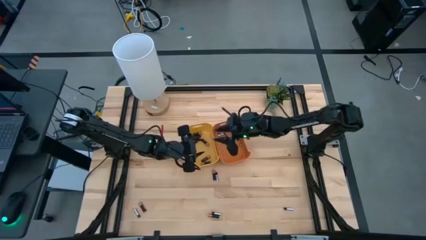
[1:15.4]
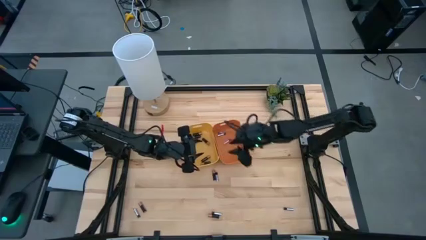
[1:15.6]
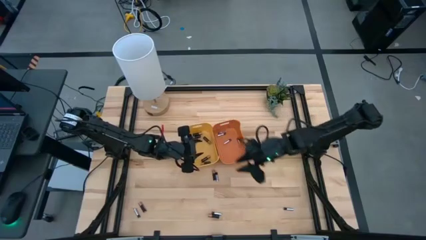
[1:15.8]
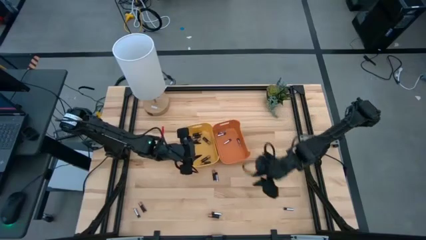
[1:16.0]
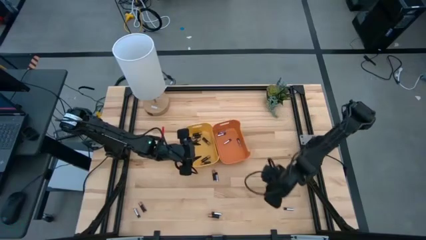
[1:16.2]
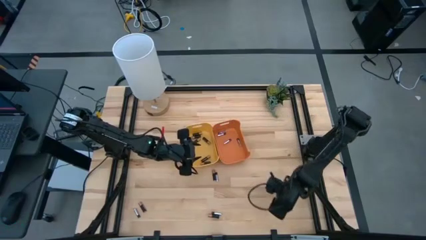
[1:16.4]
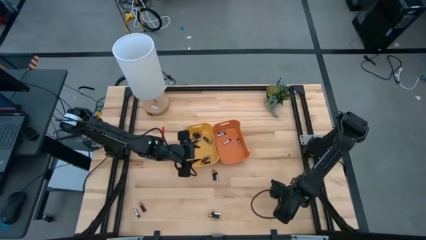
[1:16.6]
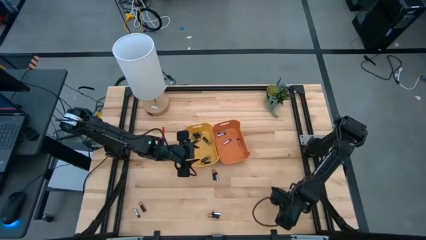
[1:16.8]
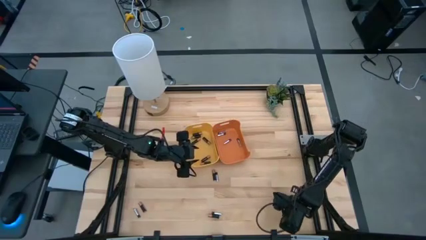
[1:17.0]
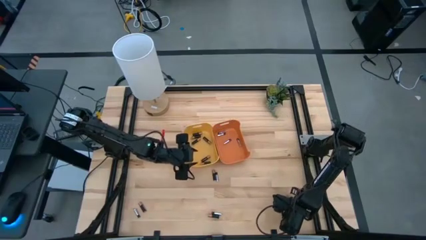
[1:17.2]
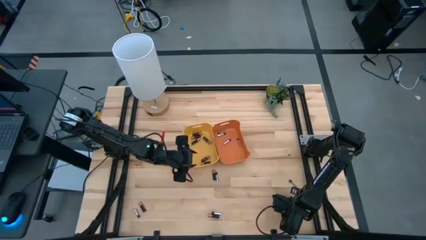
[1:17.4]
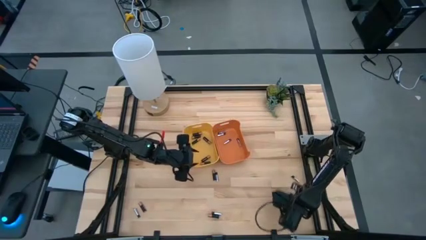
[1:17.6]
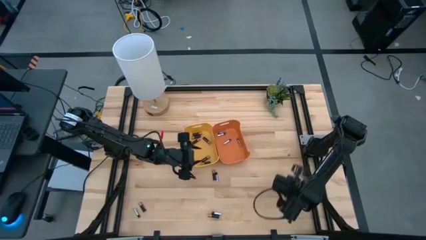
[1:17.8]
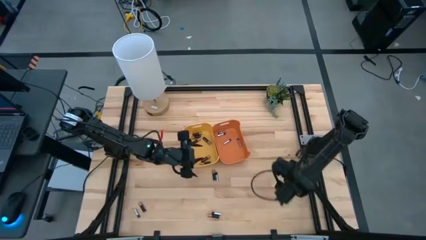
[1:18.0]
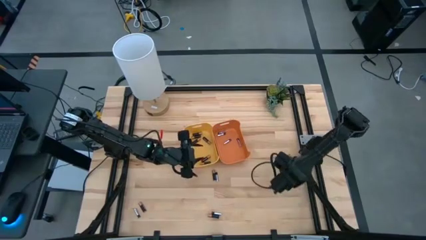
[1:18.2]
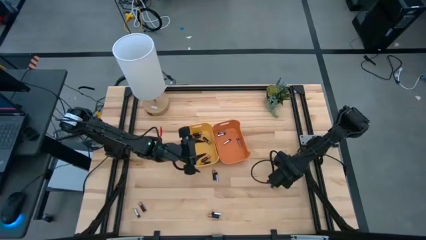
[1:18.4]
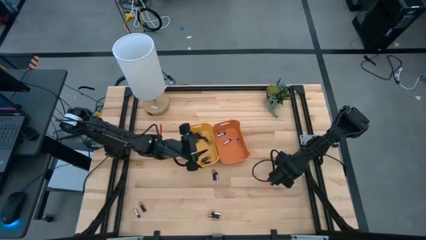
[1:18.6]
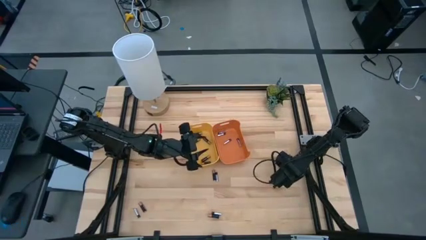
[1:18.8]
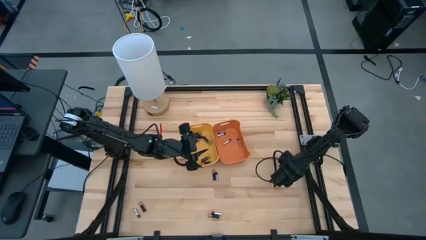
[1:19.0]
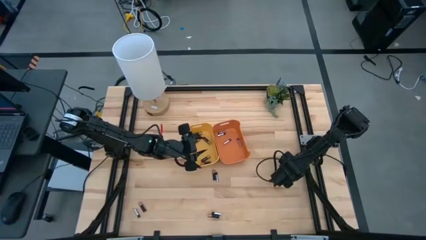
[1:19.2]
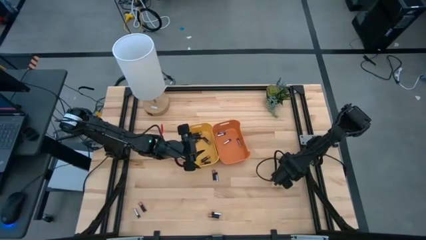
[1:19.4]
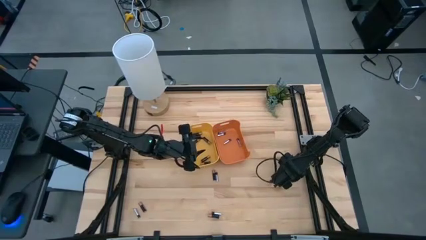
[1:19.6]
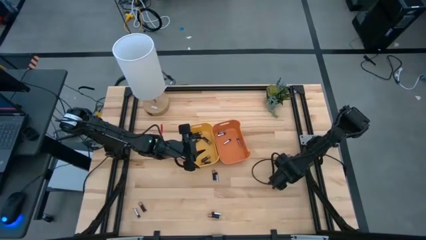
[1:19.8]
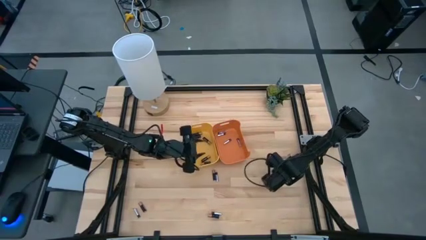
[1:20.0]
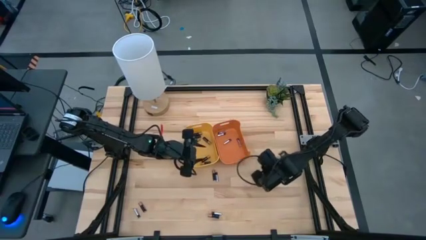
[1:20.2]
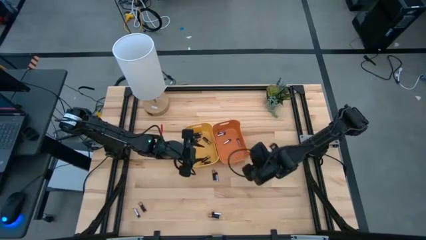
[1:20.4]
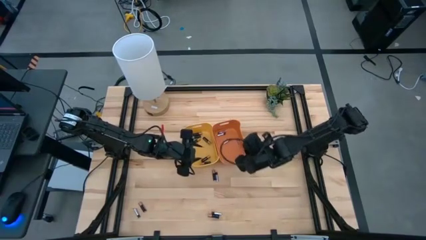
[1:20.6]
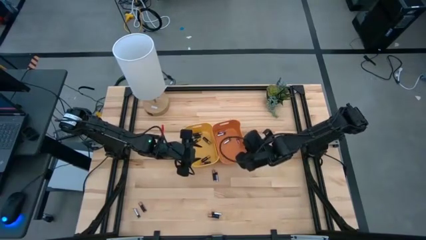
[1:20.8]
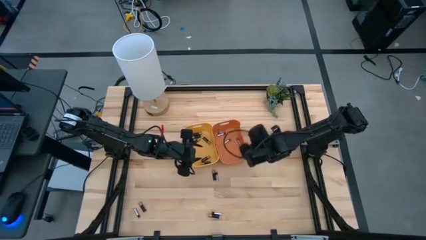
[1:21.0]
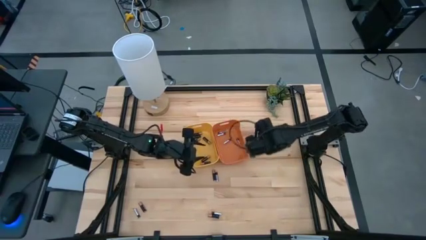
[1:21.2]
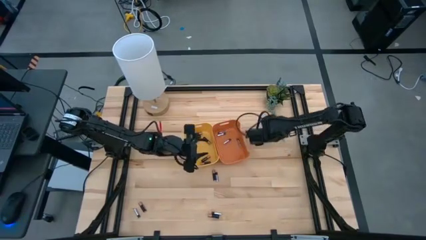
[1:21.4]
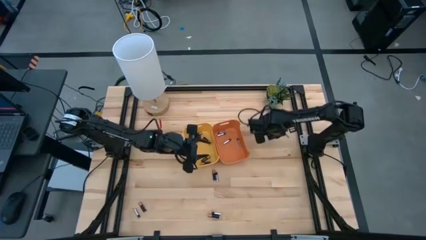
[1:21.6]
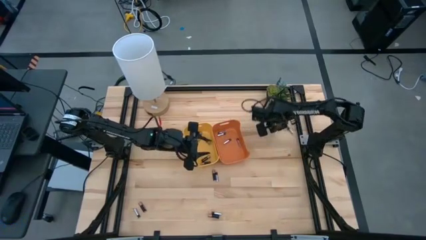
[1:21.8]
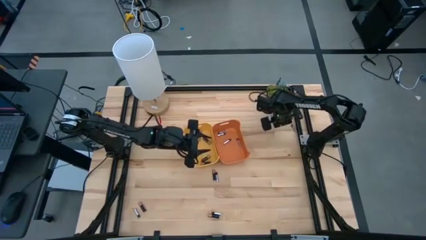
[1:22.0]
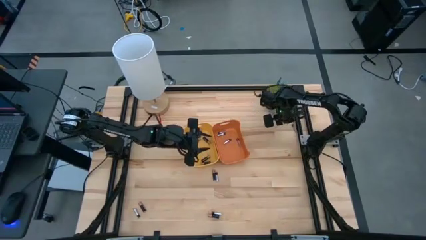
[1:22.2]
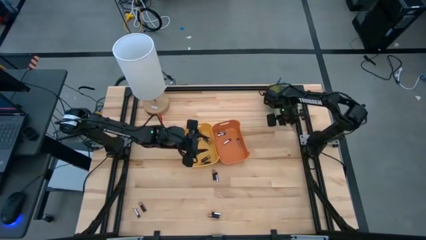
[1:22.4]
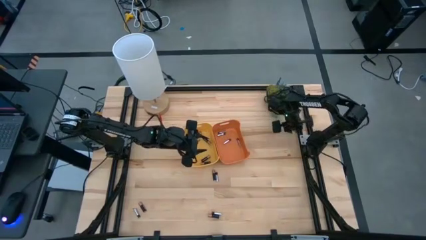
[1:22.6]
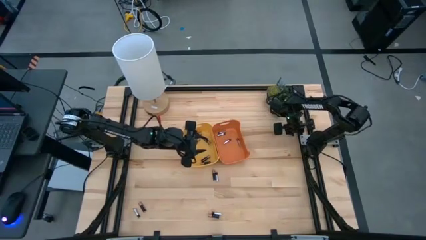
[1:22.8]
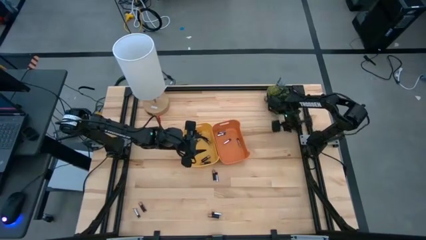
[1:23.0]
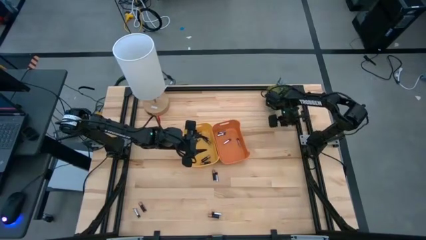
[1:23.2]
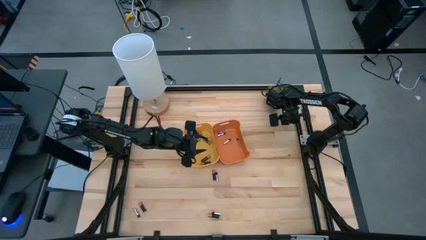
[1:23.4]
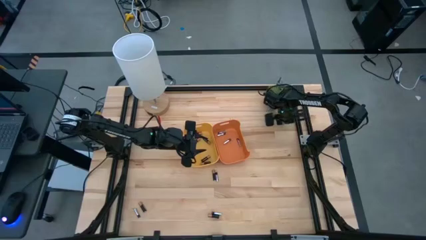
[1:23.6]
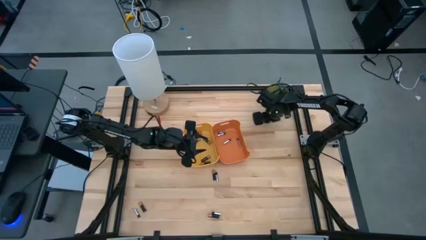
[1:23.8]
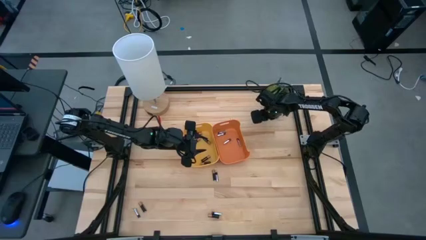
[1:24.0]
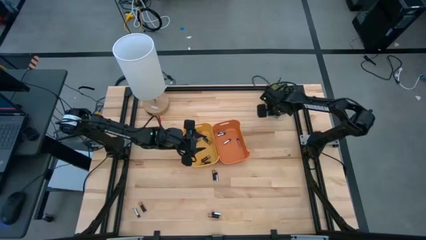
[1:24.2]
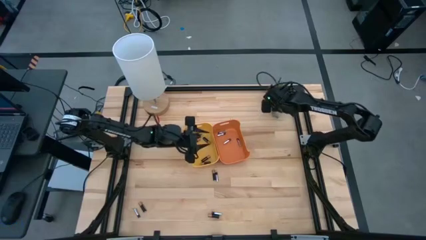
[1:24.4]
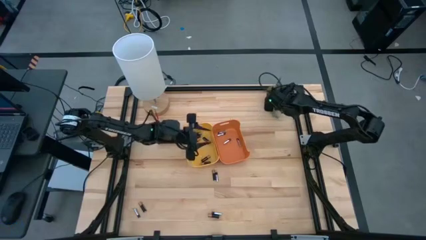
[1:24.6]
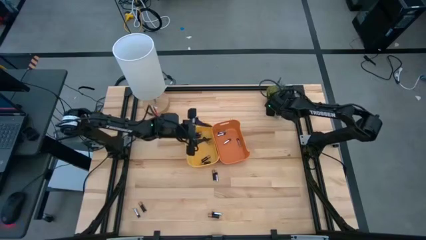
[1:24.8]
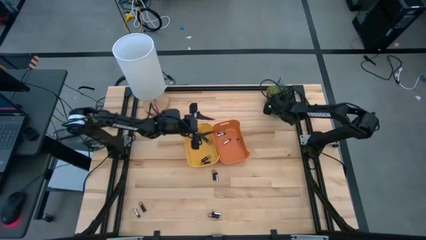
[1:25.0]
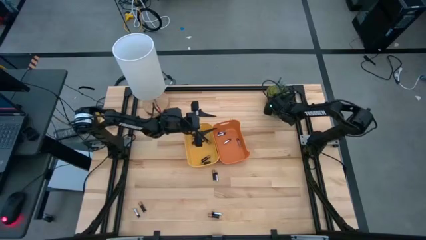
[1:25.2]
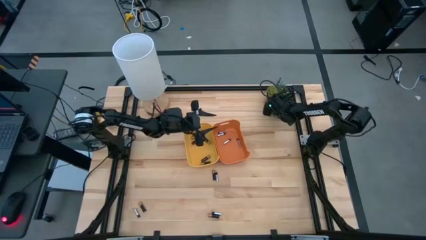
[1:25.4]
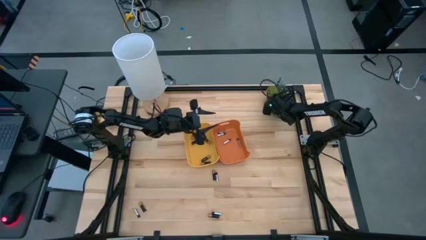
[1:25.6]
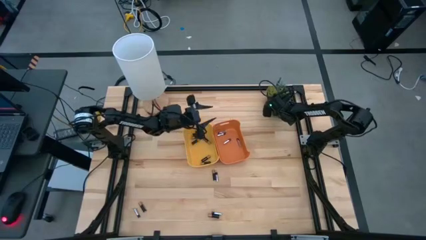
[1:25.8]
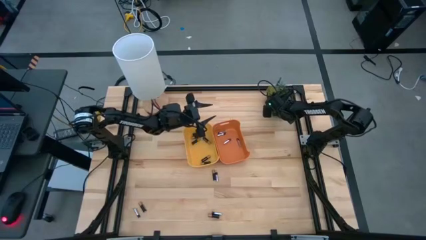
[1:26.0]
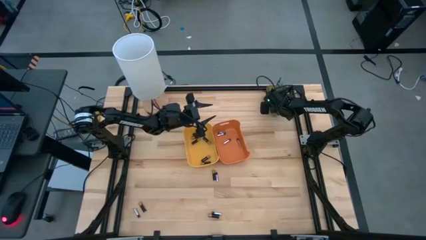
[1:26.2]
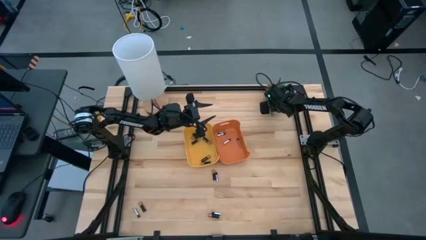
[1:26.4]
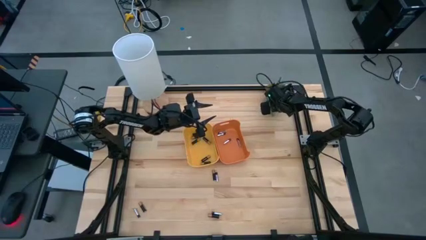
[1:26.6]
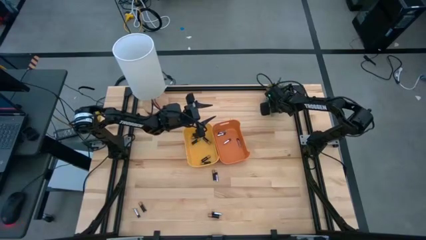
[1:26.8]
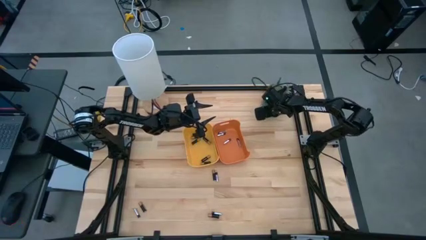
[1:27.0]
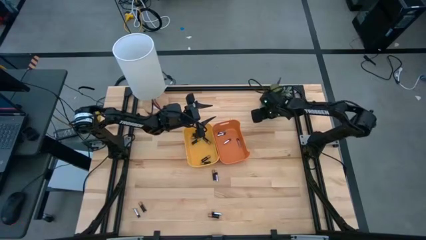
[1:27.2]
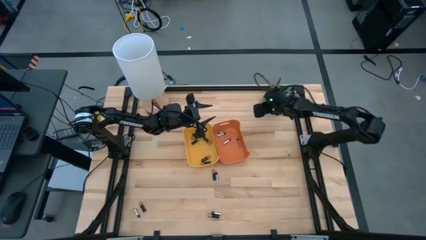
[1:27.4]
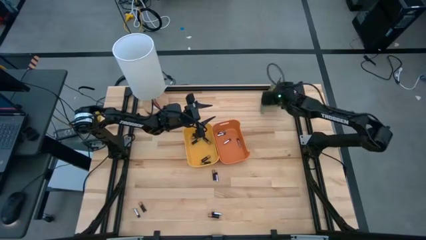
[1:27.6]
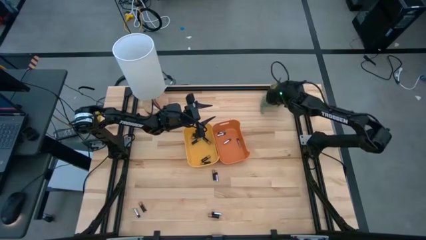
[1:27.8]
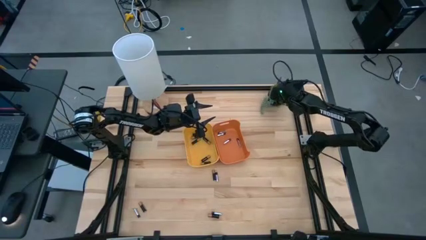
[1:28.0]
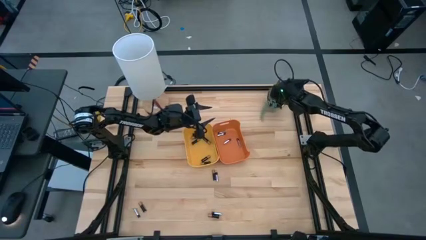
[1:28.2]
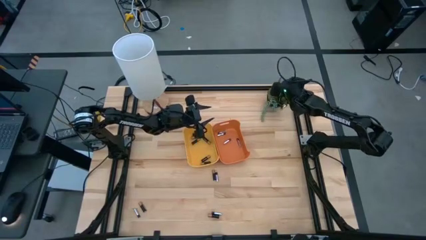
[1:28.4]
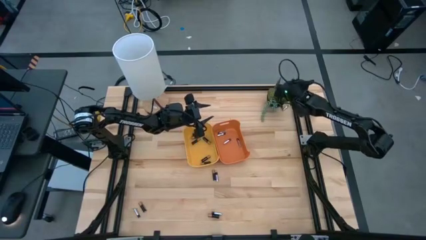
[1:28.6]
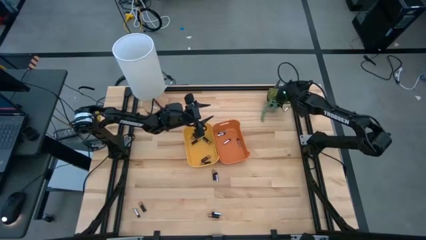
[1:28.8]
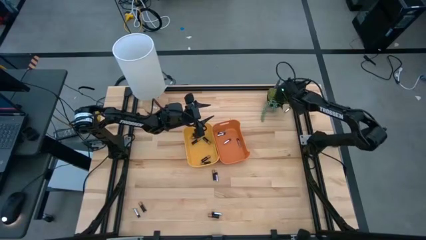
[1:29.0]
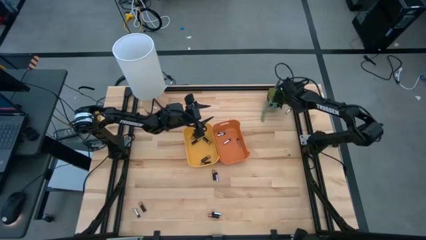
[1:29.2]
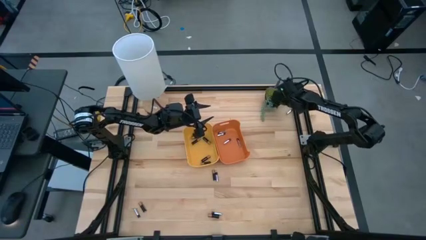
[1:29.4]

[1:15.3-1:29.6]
Task: Sort batteries
Put the bottom right silver battery into the orange bin

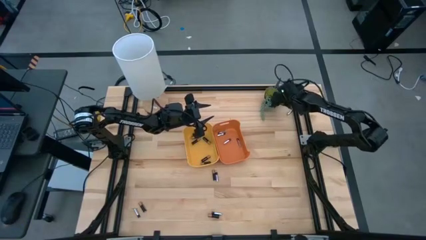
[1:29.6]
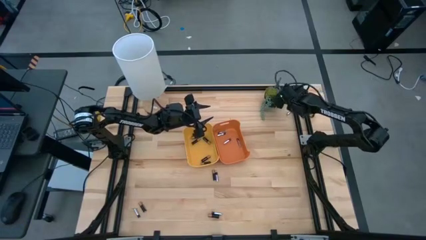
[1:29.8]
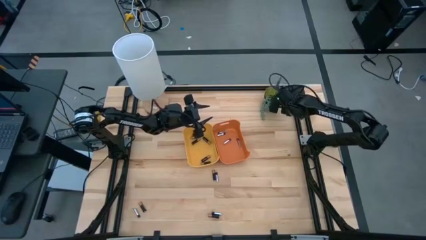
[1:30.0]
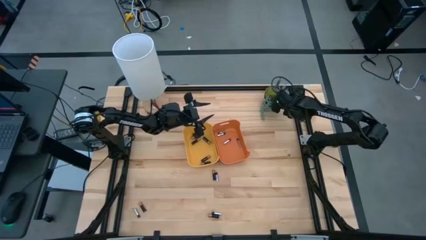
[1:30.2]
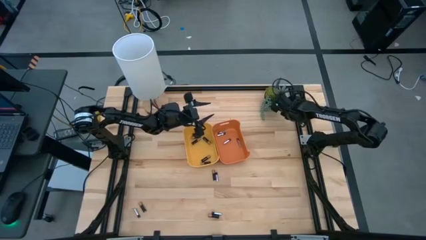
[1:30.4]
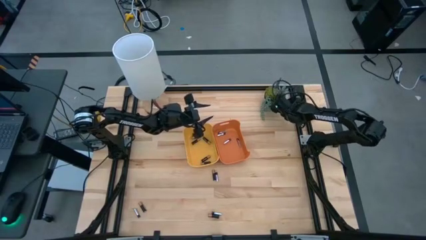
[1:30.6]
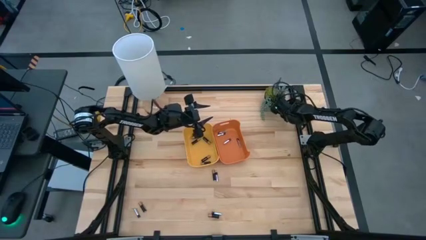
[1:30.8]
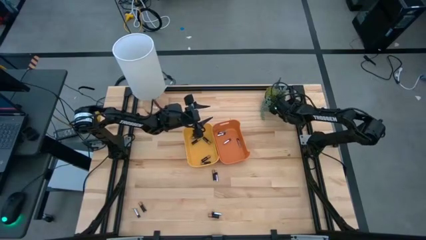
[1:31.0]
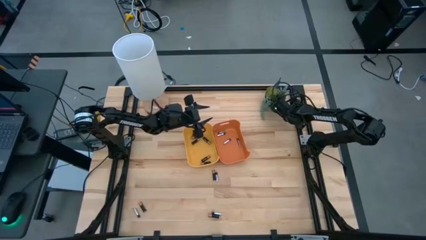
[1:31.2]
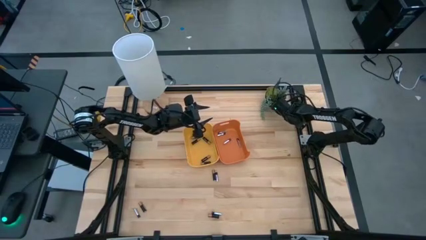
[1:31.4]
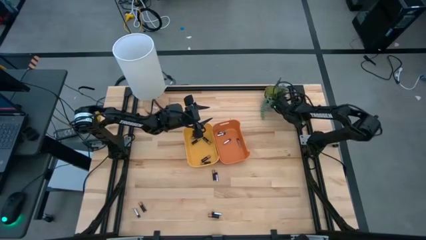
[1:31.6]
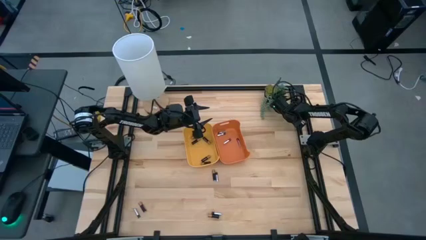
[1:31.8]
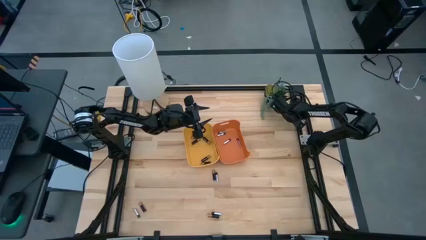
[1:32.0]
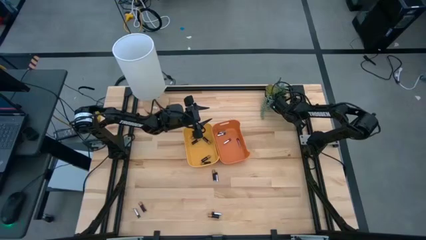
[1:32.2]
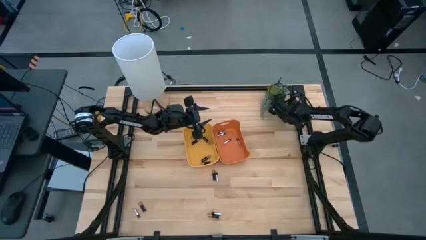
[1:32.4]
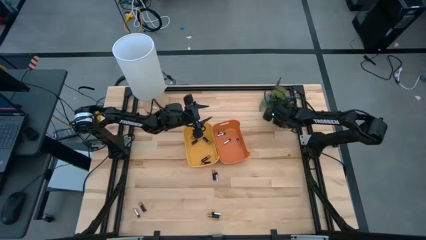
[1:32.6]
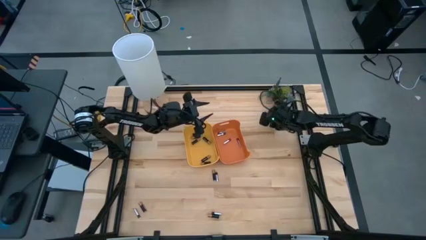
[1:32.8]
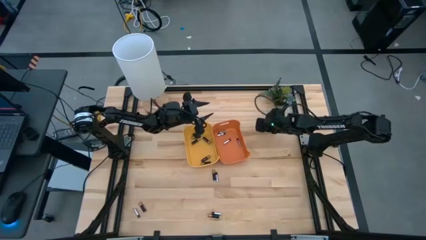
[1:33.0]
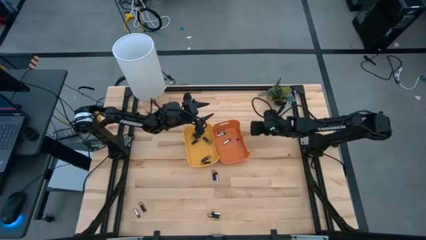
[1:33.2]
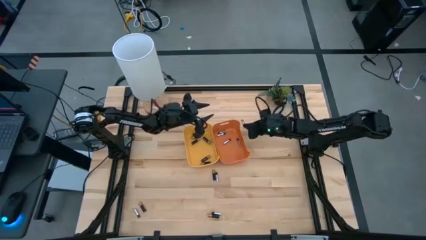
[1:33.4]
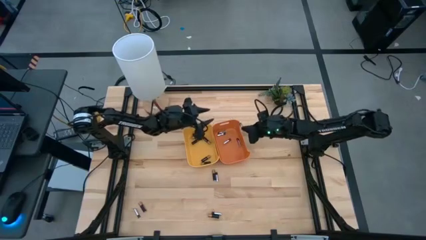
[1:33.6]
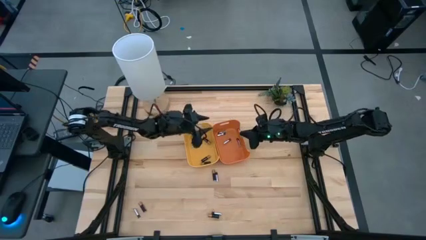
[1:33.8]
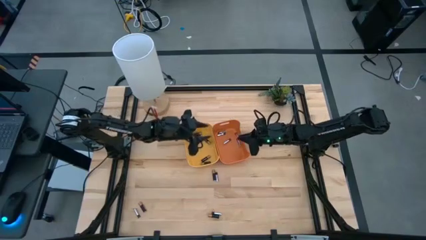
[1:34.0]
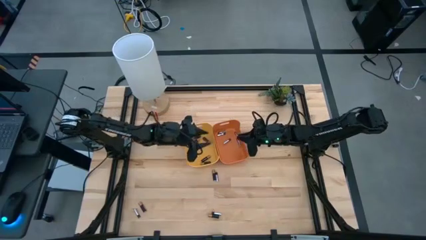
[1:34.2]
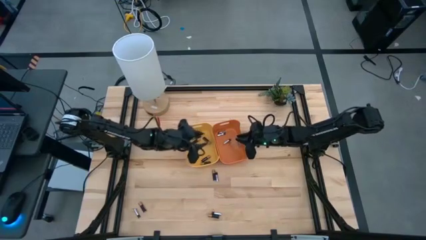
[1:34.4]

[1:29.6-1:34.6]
Put the bottom right silver battery into the orange bin
